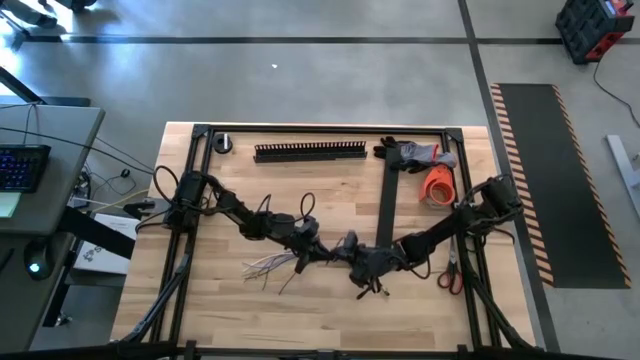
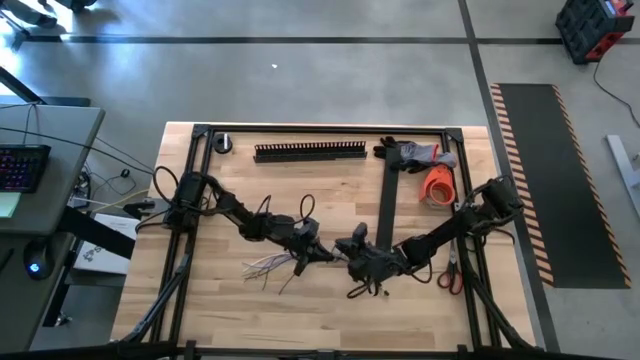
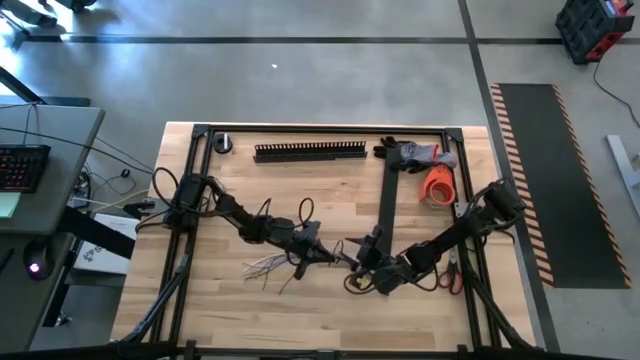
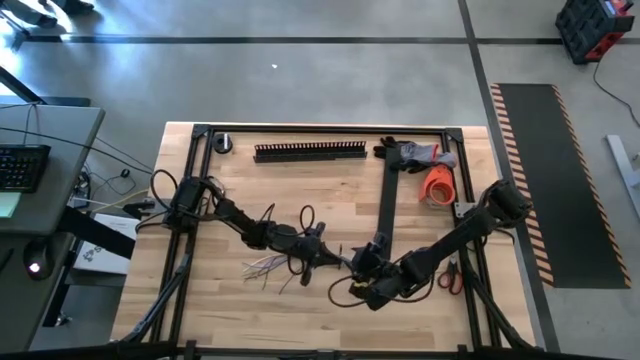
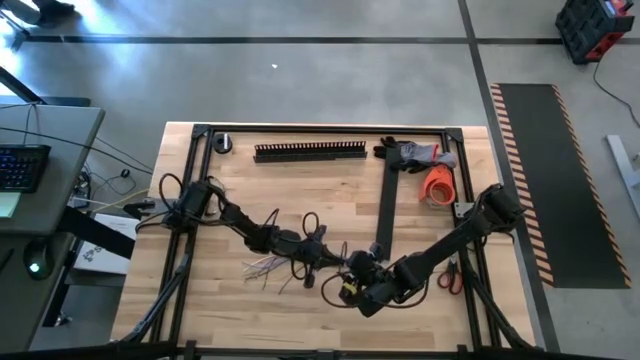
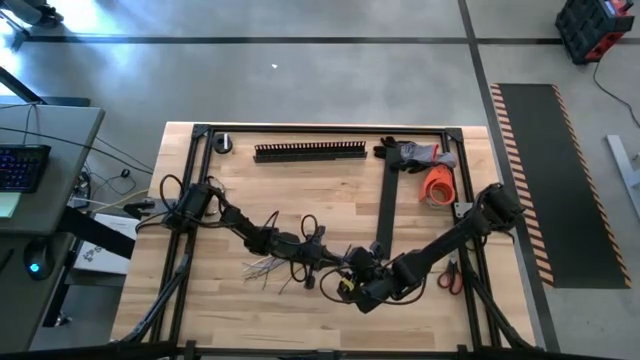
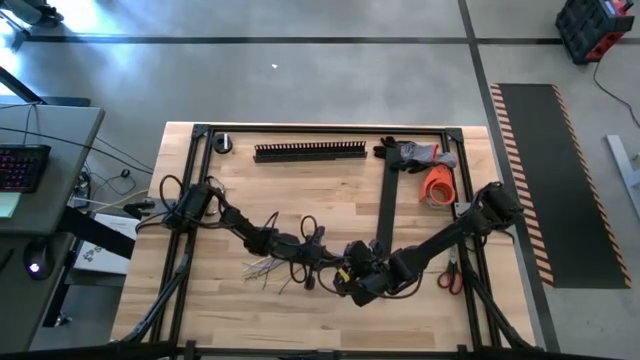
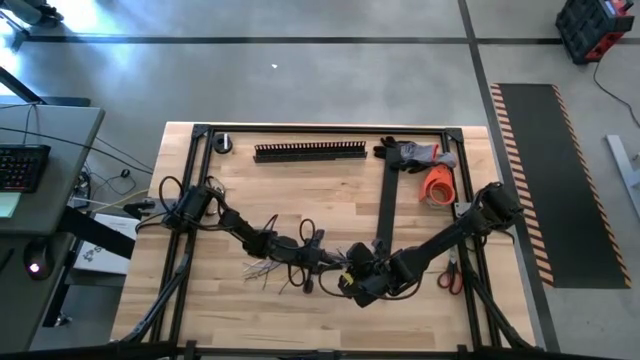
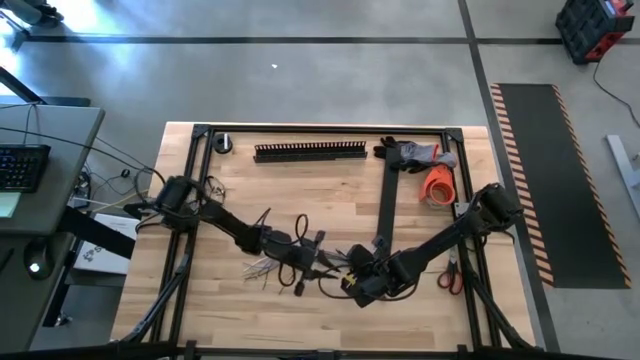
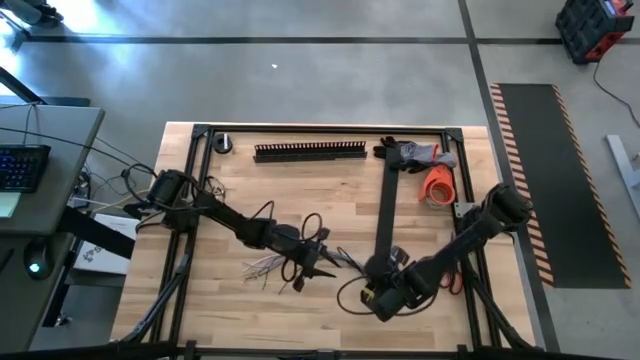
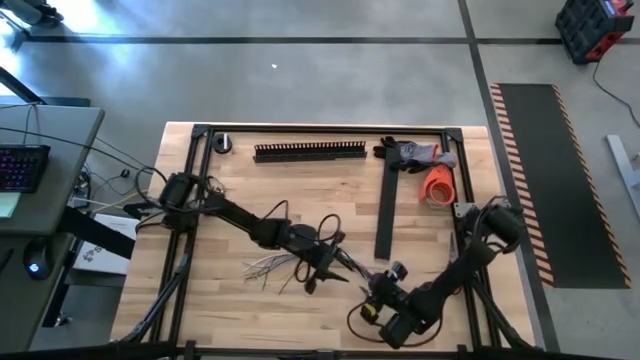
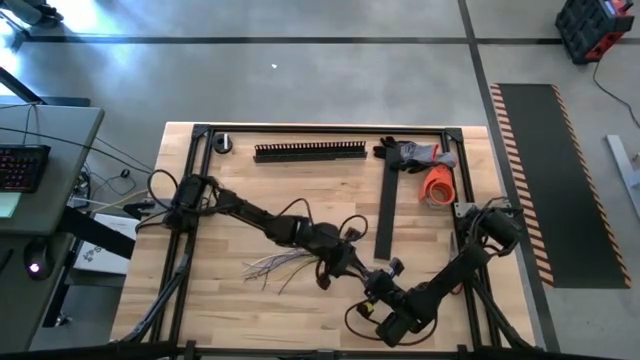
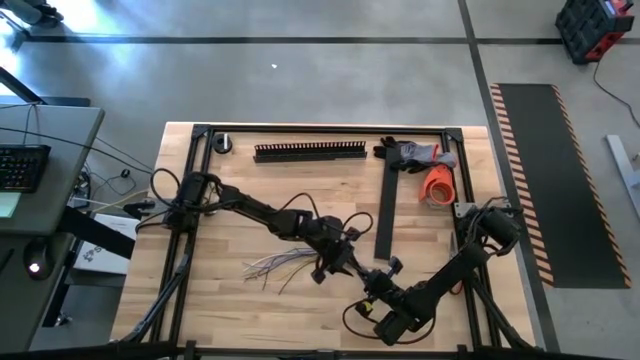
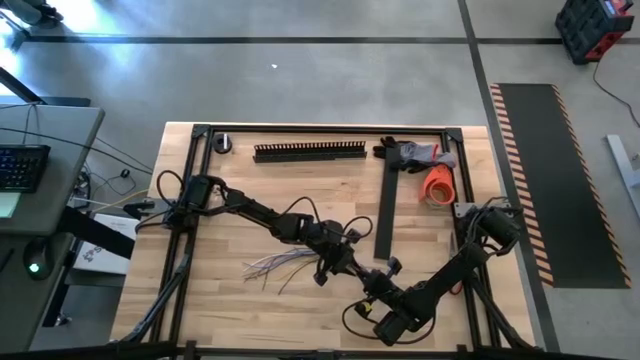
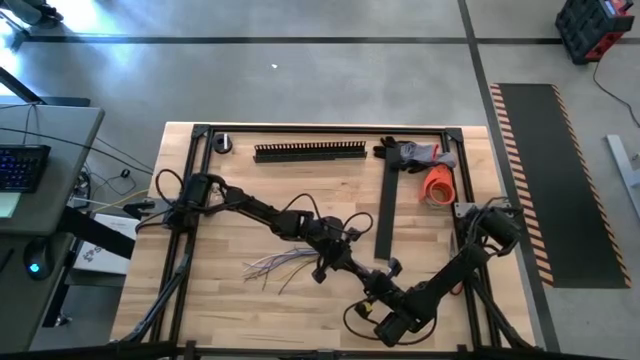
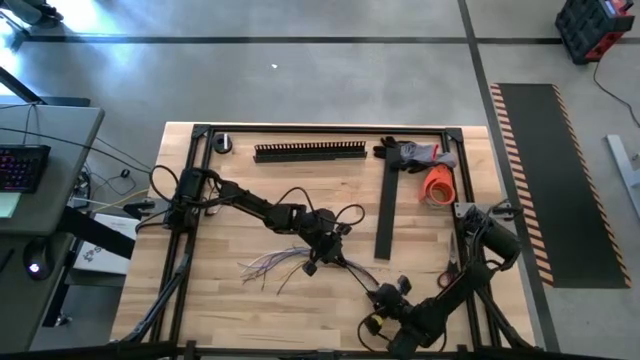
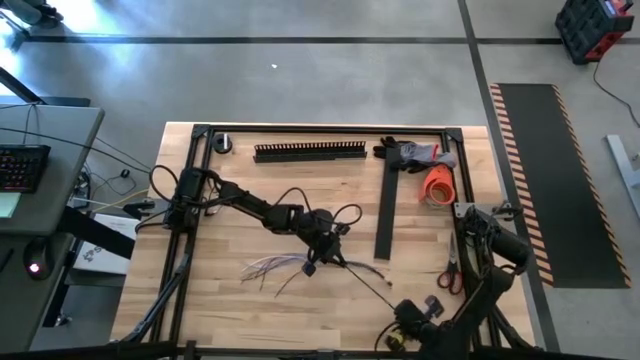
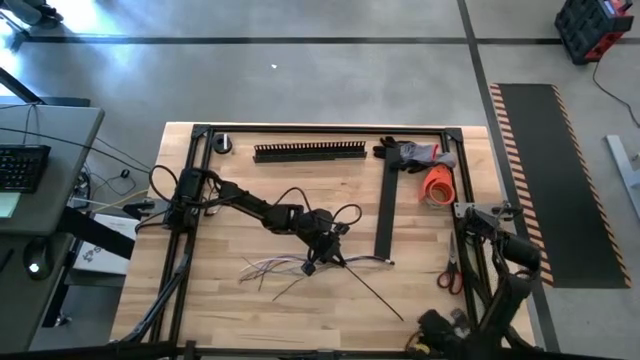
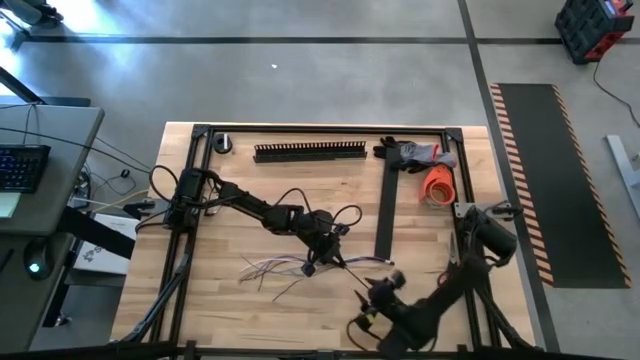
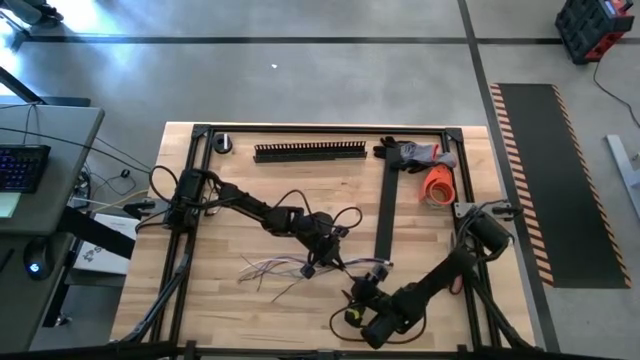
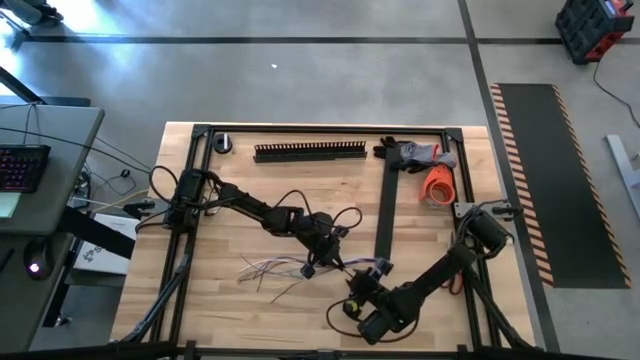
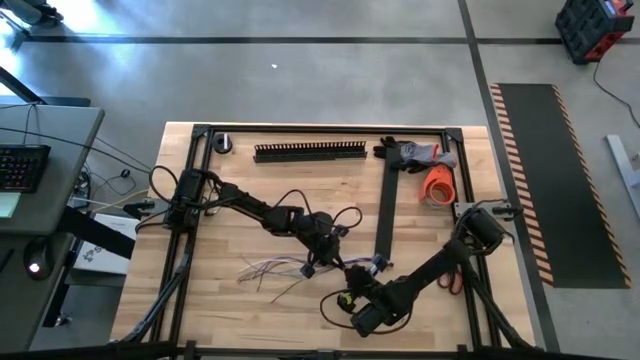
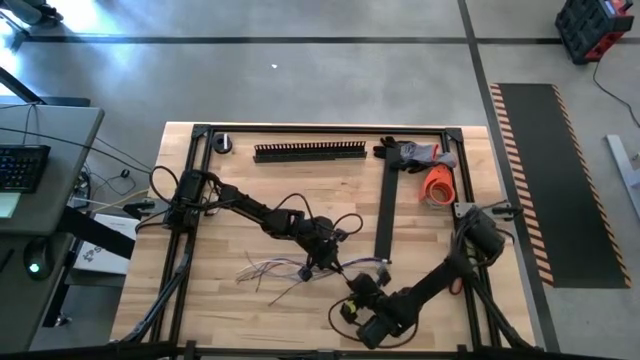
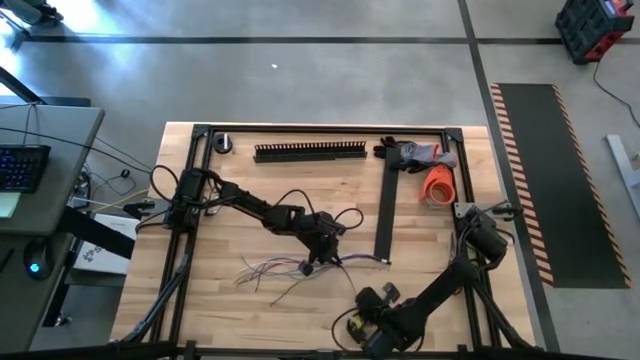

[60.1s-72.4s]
Task: Ziptie cables
Wrap the cable wires using the black zip tie
